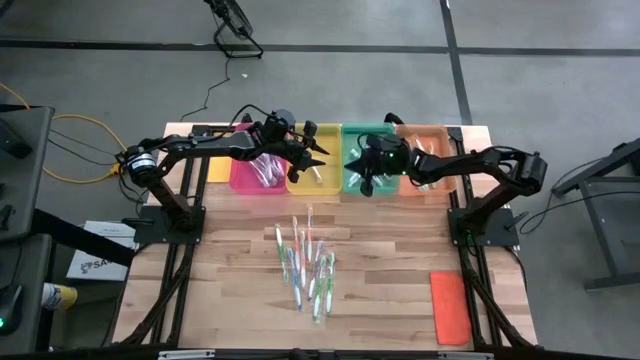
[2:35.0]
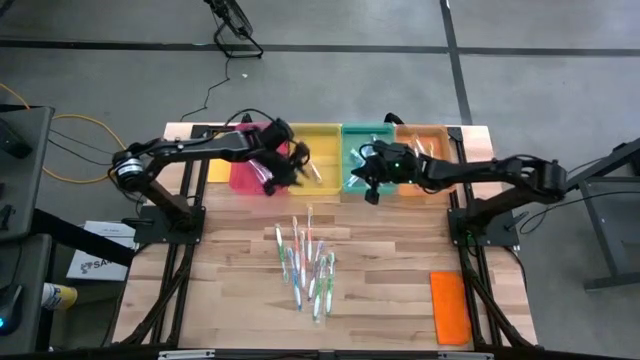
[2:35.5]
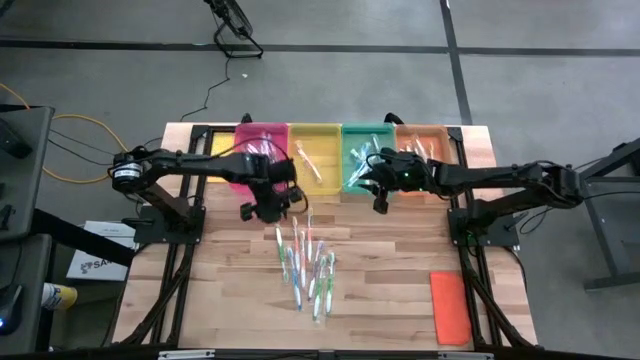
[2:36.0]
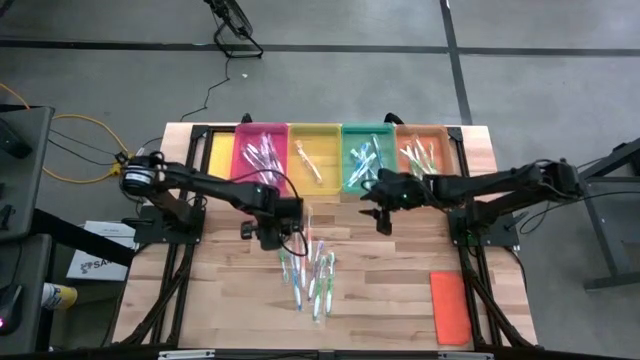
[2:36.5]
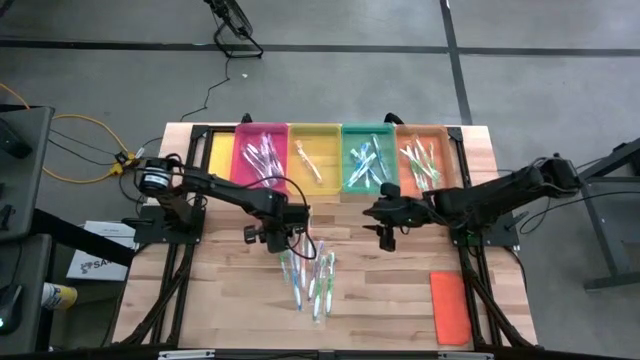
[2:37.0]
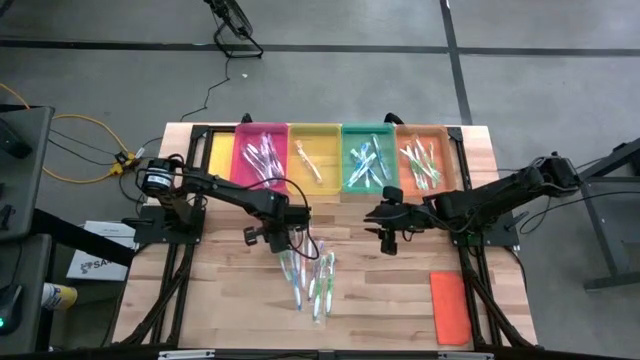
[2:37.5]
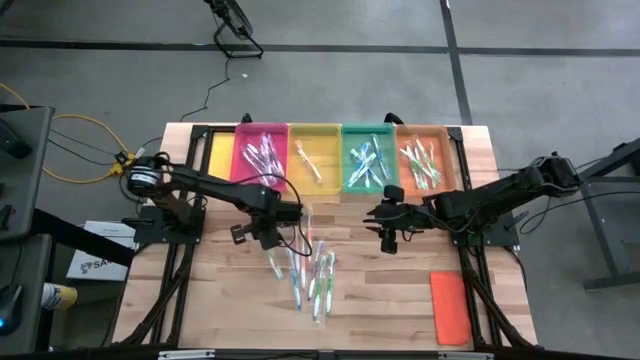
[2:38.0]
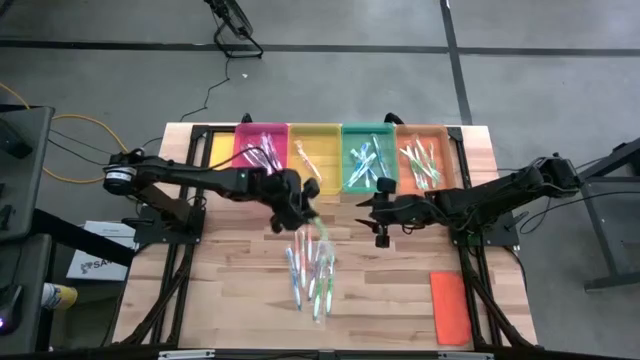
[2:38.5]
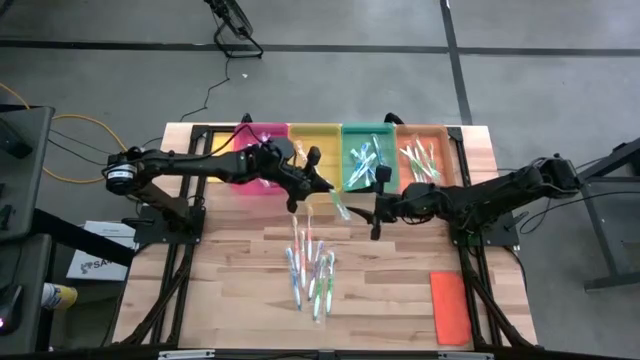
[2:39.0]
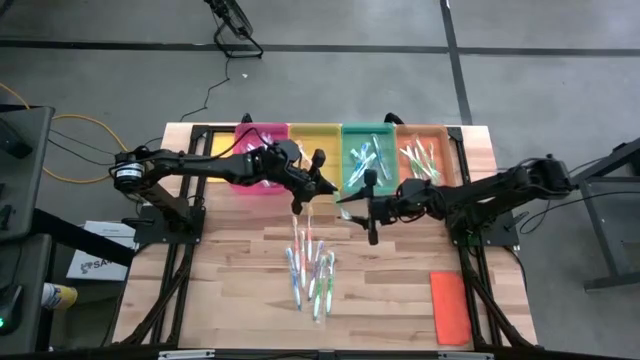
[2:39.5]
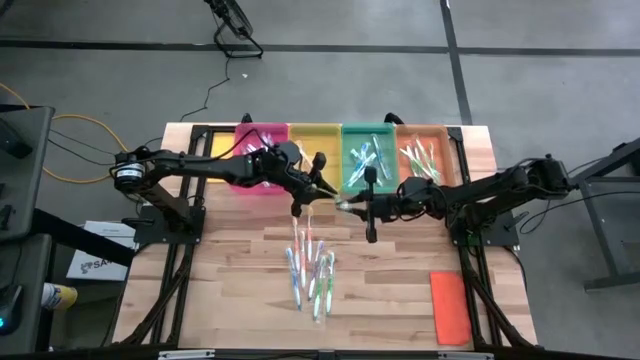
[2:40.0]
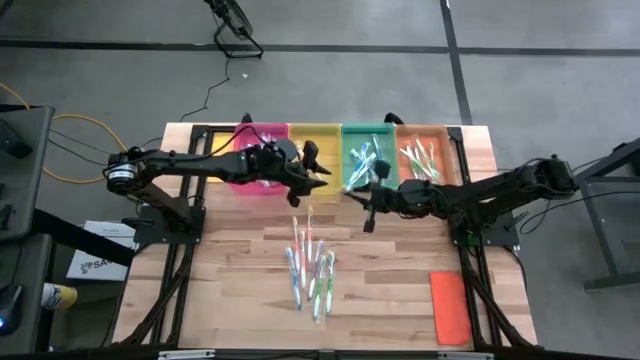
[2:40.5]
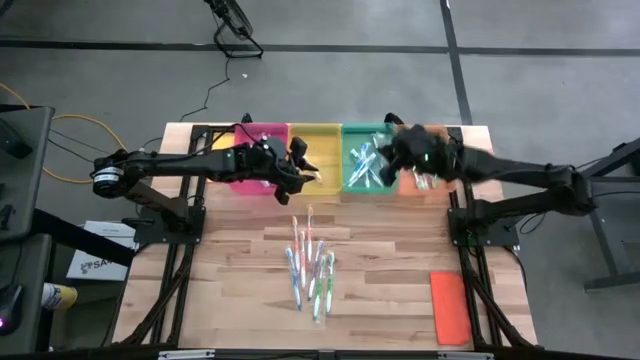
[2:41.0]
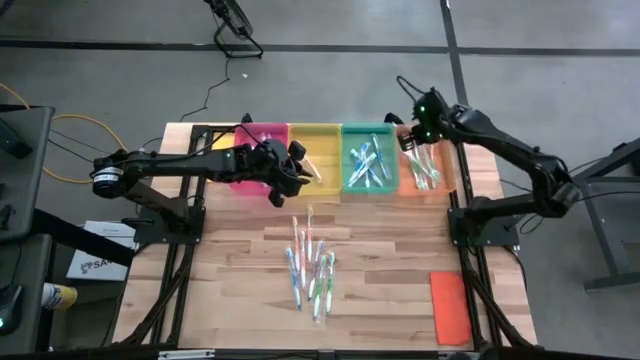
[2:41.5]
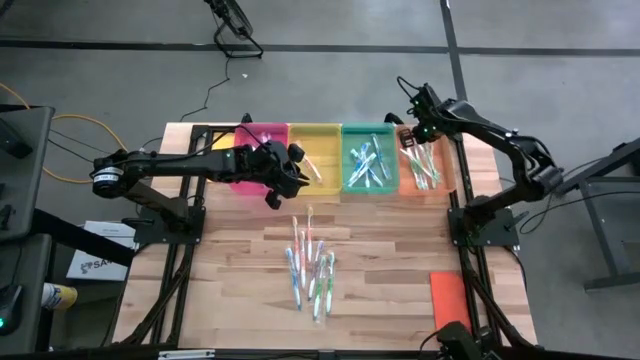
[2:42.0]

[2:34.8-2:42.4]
Task: Pick & Place Toothbrushes
Put the green toothbrush into the orange bin

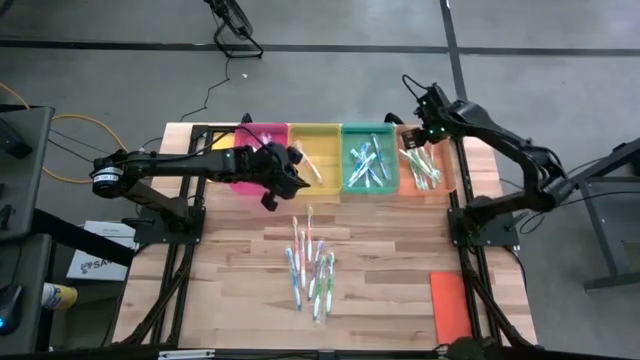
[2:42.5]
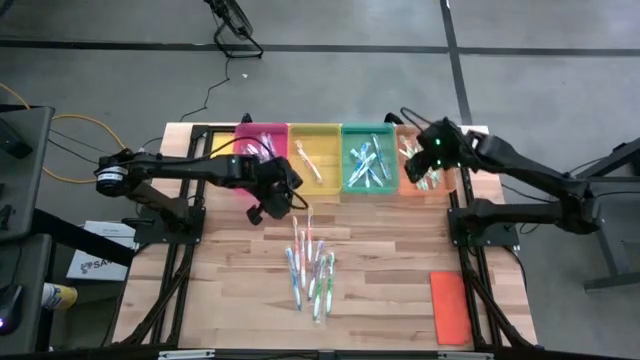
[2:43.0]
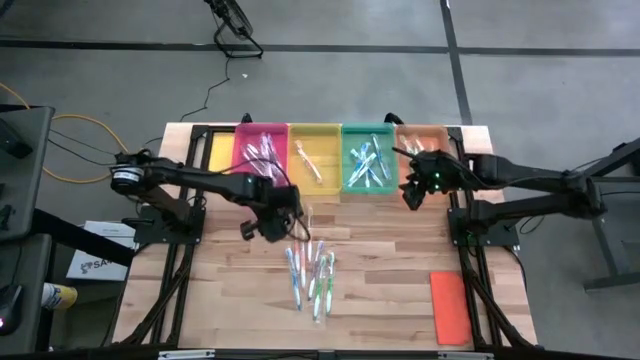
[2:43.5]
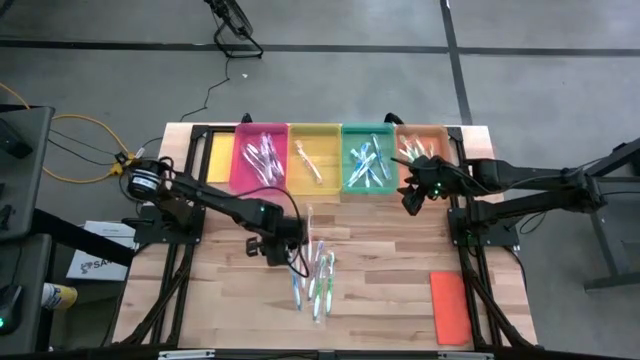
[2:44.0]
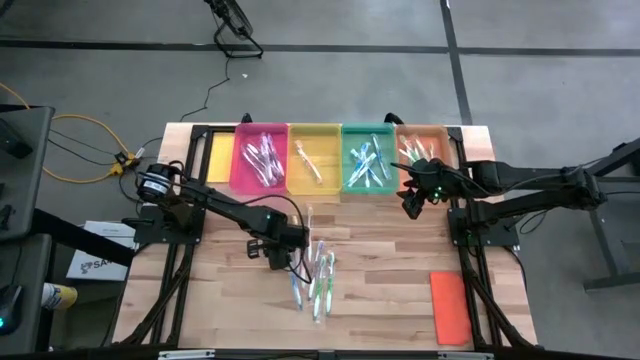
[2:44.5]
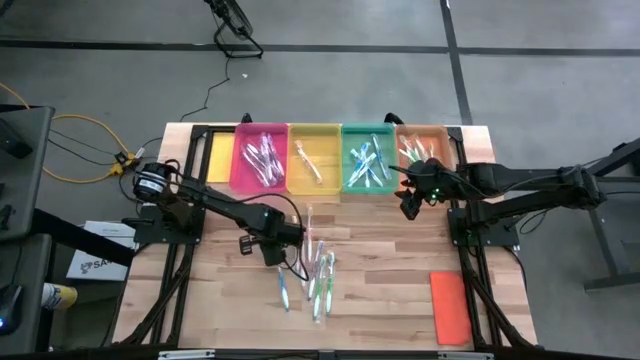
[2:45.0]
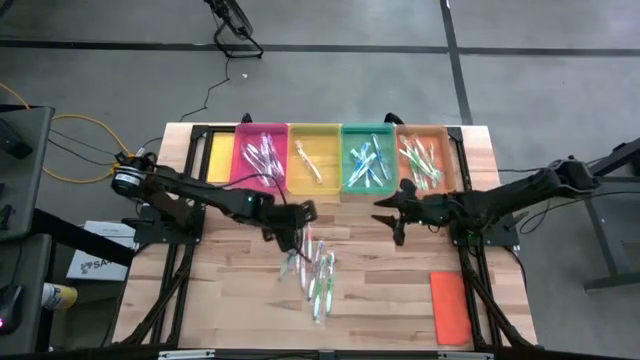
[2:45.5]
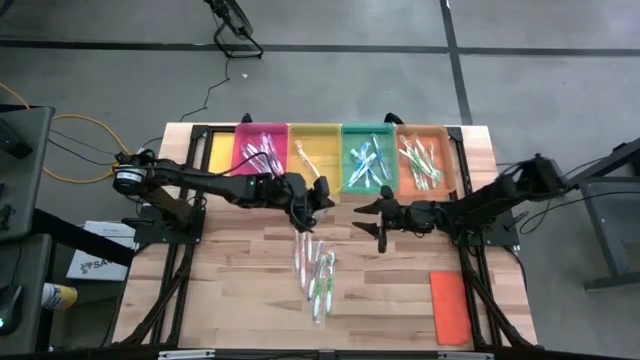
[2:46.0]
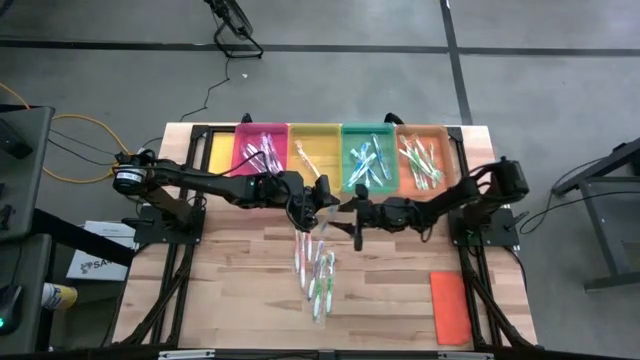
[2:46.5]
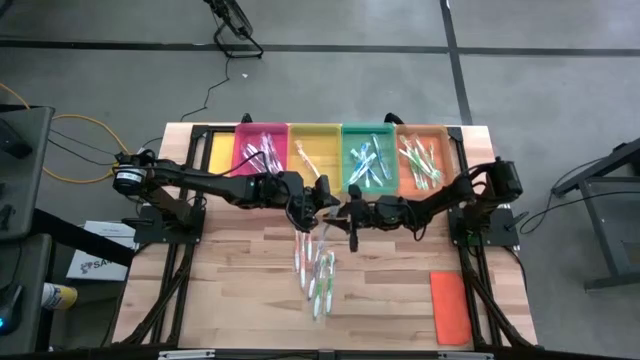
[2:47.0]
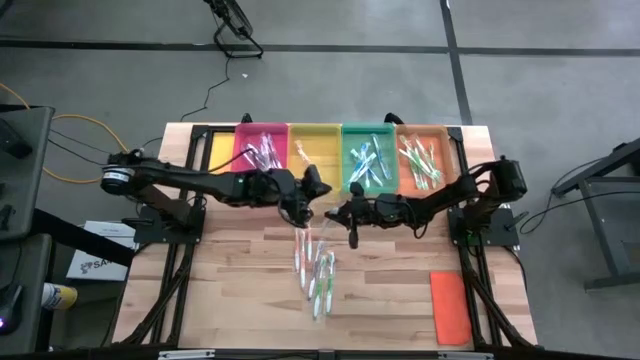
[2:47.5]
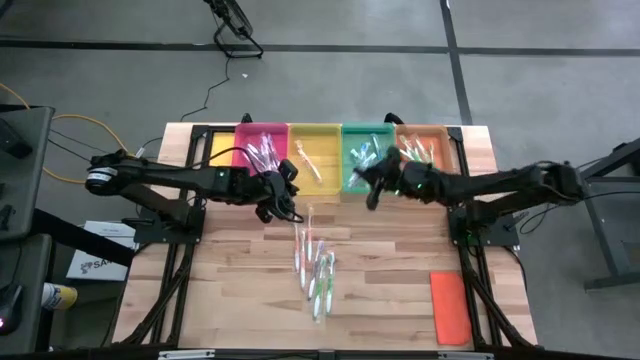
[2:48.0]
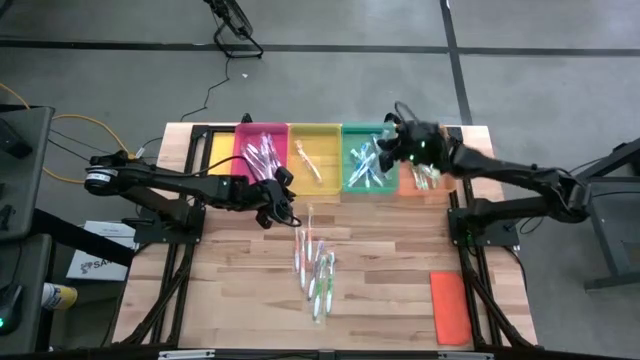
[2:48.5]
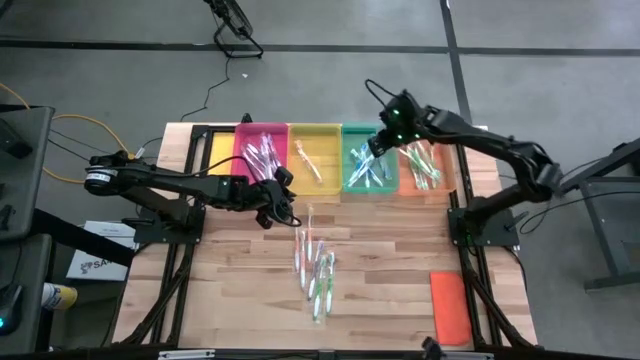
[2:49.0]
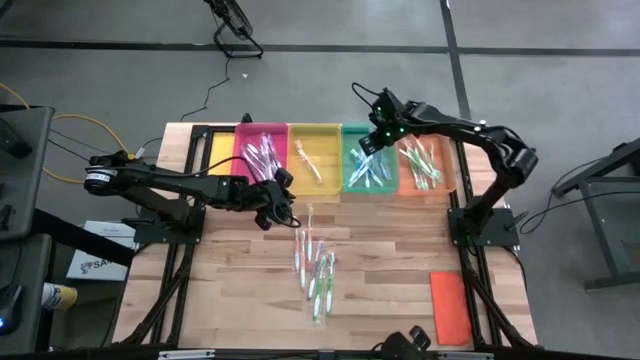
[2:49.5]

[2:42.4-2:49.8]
Put the blue toothbrush into the green bin

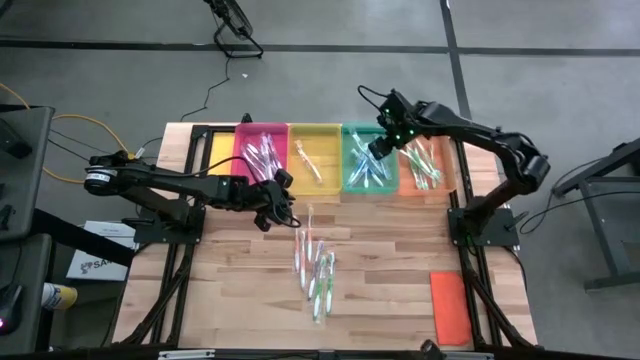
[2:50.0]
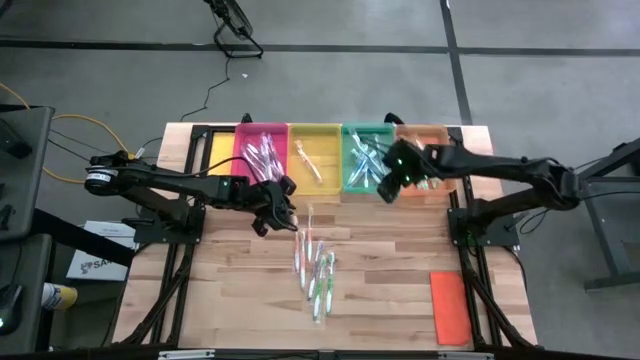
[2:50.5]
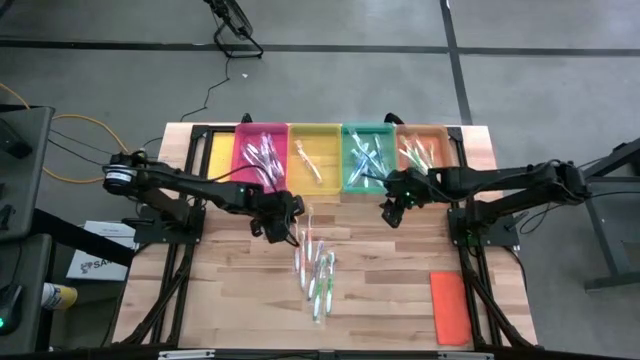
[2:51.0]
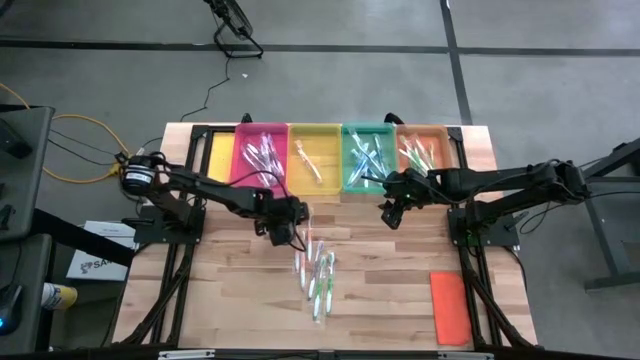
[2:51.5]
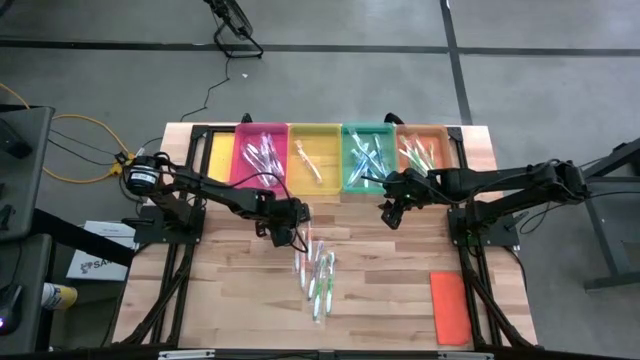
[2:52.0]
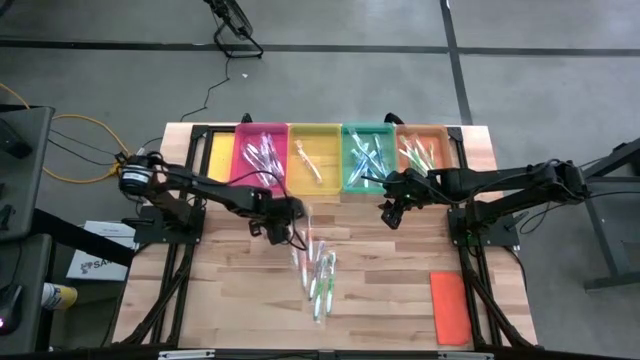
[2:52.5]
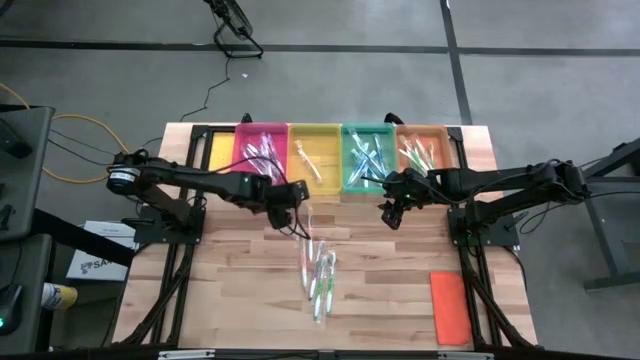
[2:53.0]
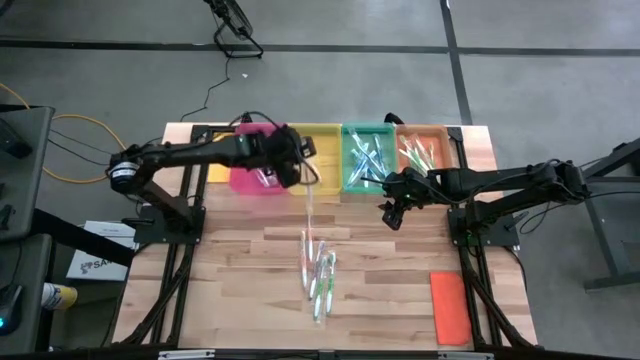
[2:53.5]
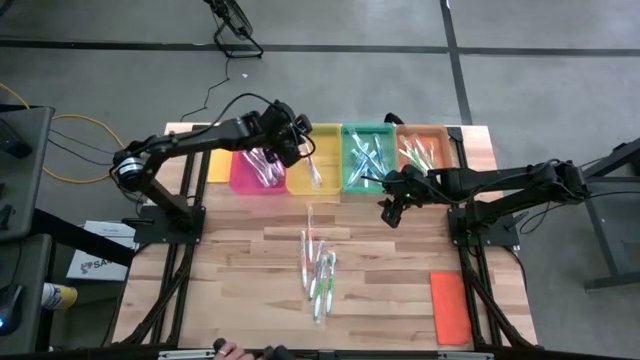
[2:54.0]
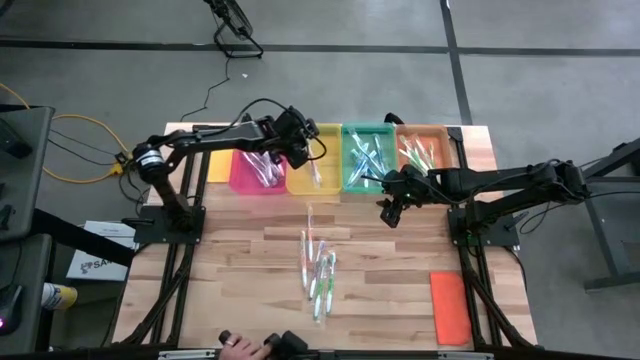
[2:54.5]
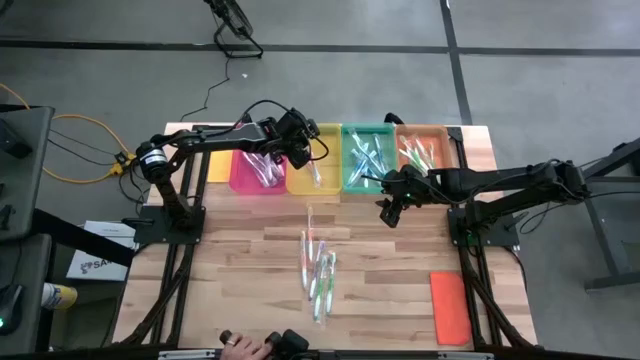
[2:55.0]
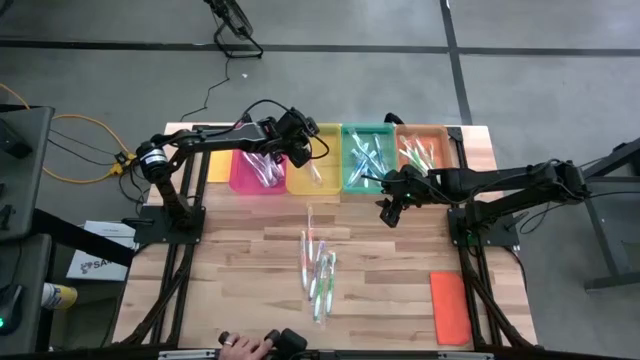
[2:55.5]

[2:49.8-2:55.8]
Put the orange toothbrush into the yellow bin

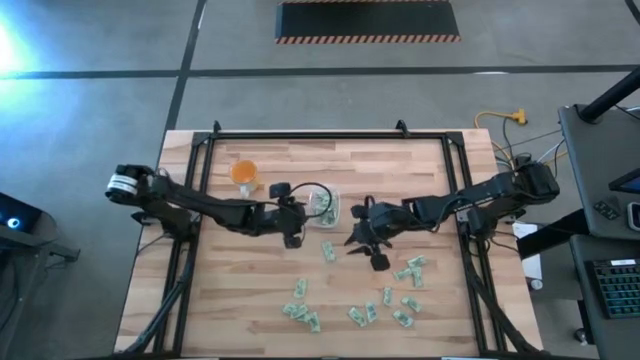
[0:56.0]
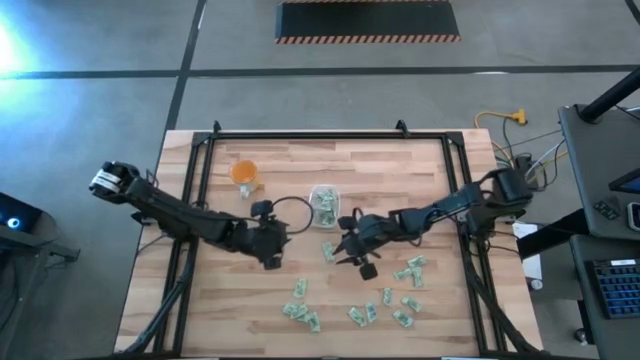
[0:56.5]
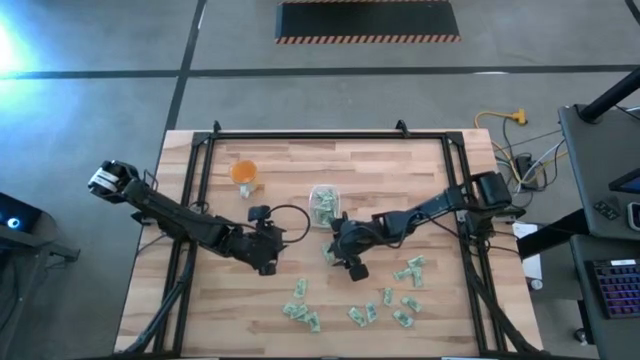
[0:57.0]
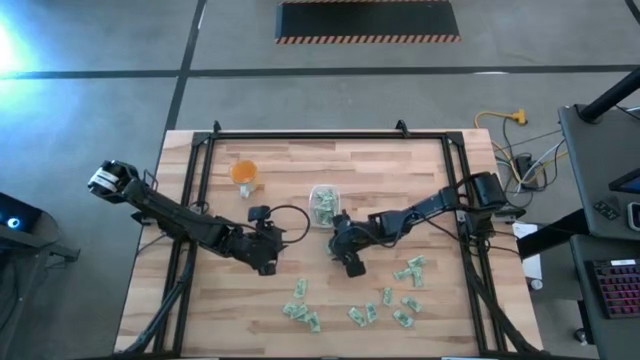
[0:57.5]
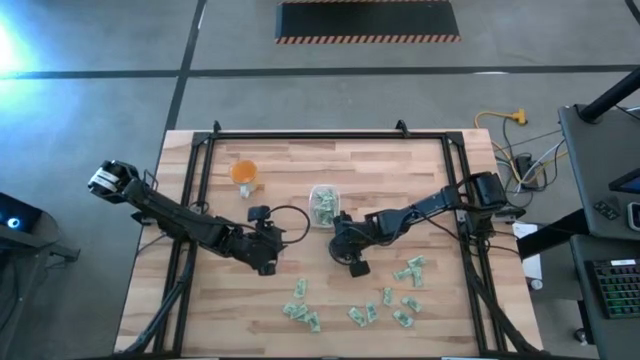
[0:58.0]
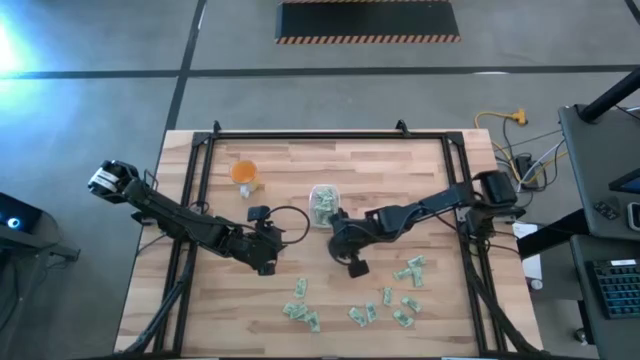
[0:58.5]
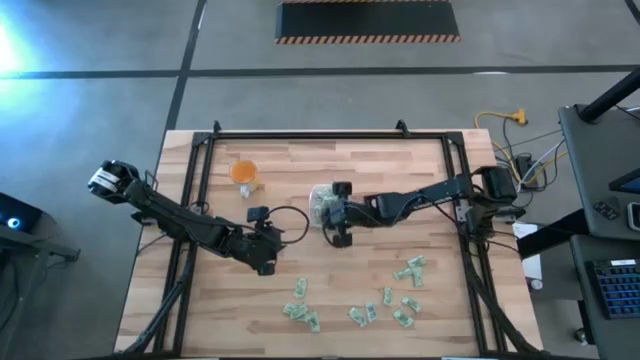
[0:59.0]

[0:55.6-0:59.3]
Task: Pick and place Stevia / Truvia into bins
Put the stevia packet into the bin
